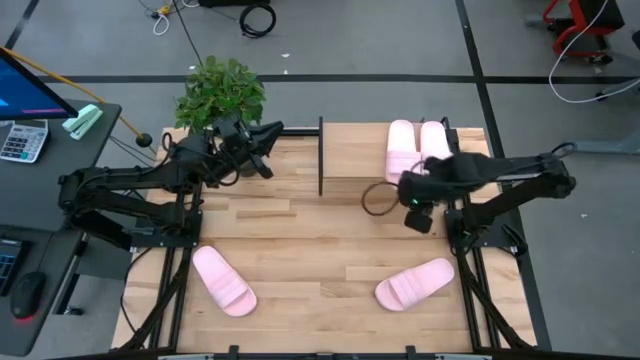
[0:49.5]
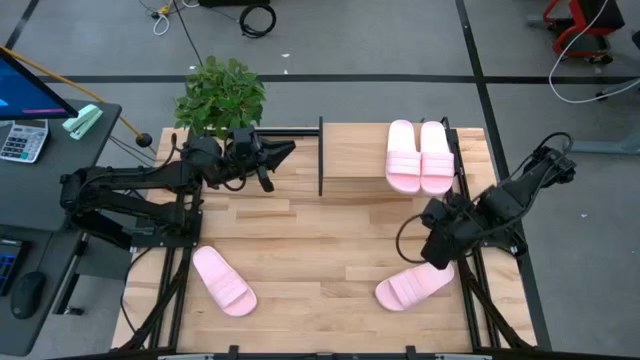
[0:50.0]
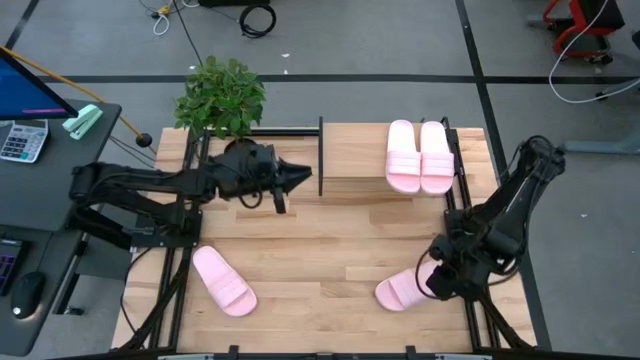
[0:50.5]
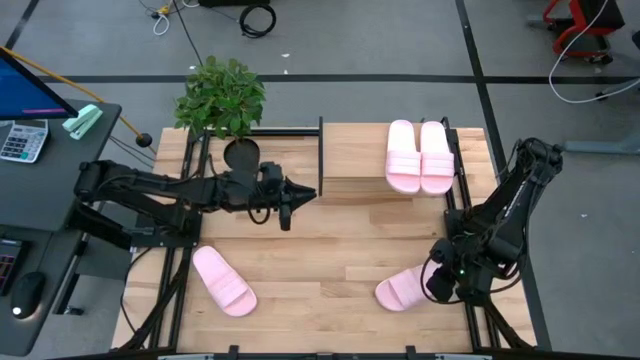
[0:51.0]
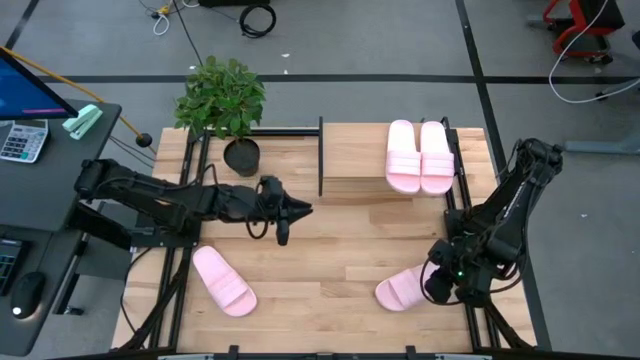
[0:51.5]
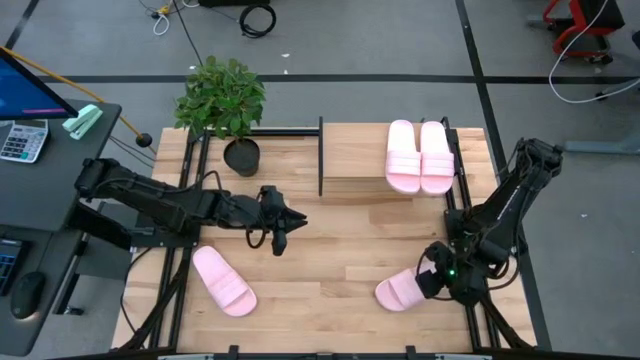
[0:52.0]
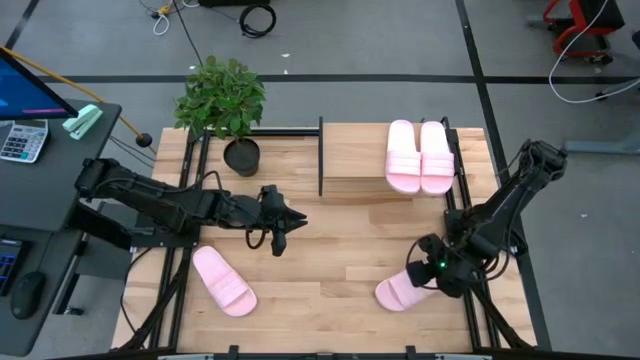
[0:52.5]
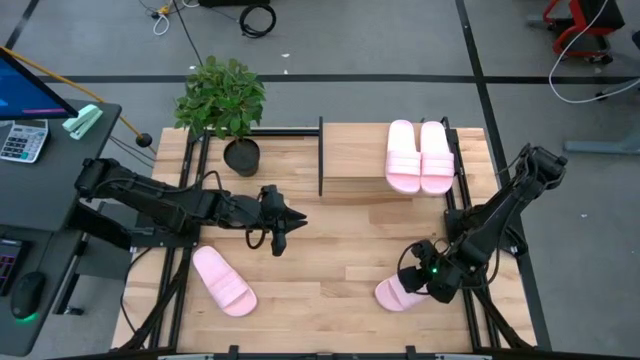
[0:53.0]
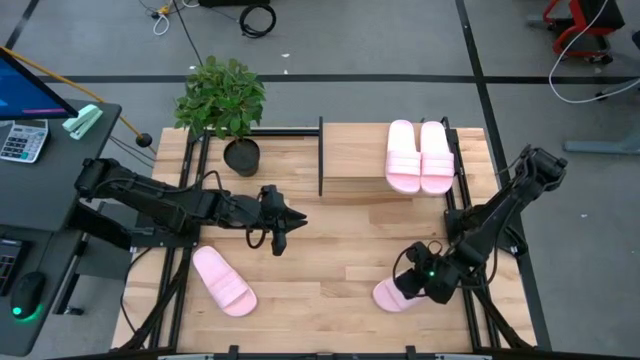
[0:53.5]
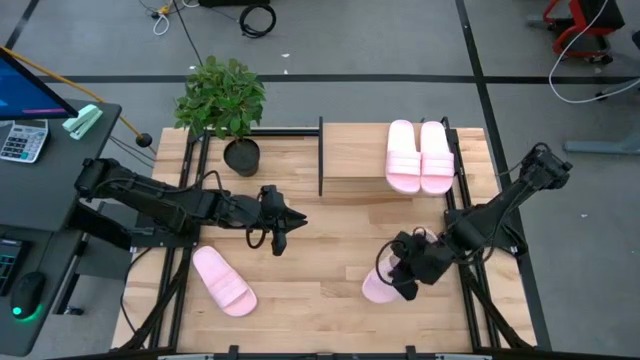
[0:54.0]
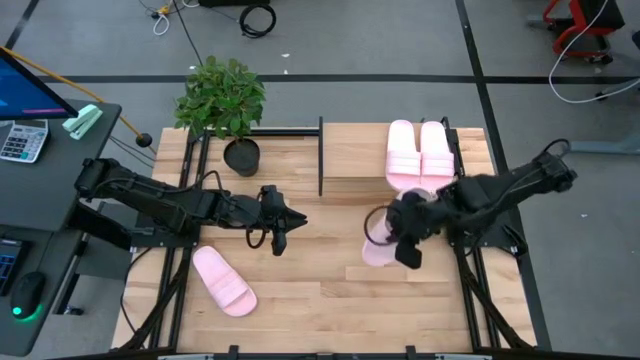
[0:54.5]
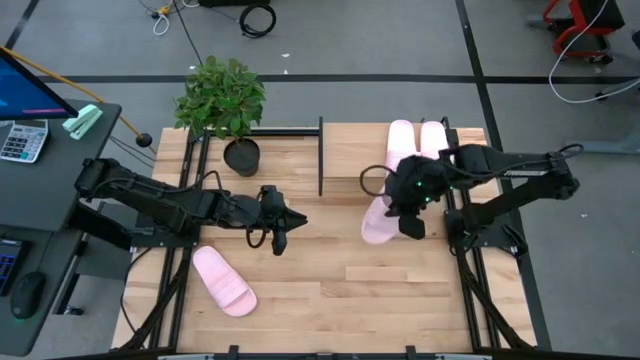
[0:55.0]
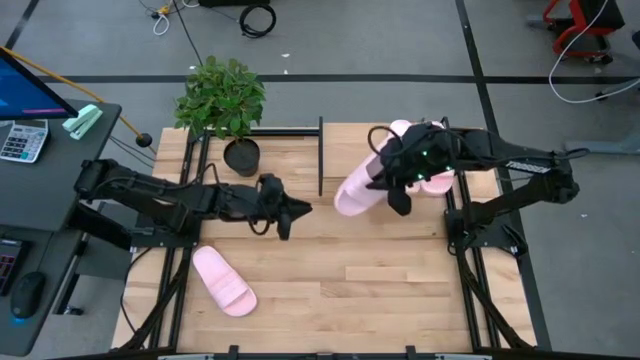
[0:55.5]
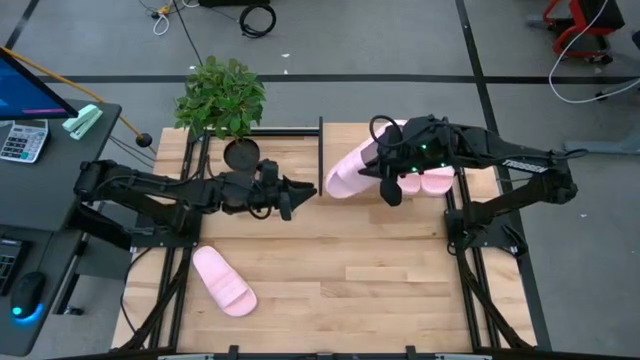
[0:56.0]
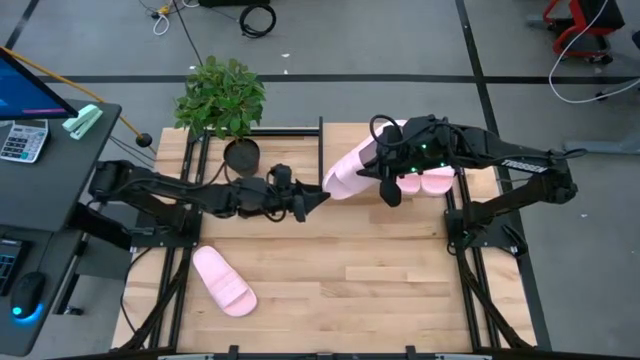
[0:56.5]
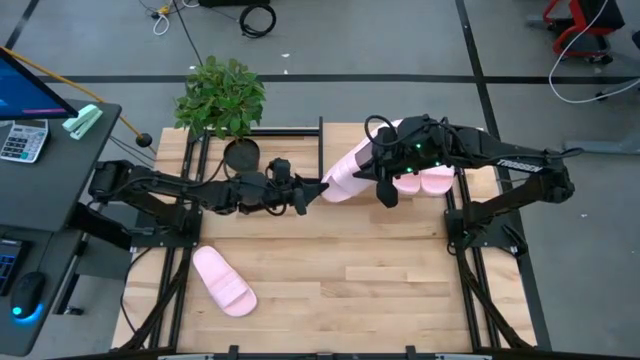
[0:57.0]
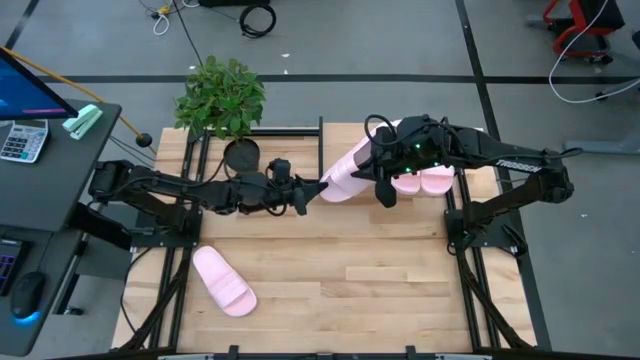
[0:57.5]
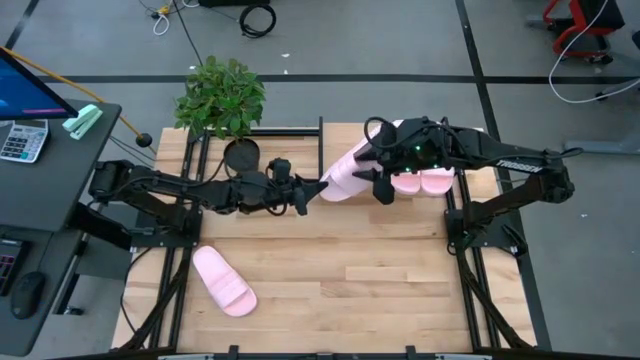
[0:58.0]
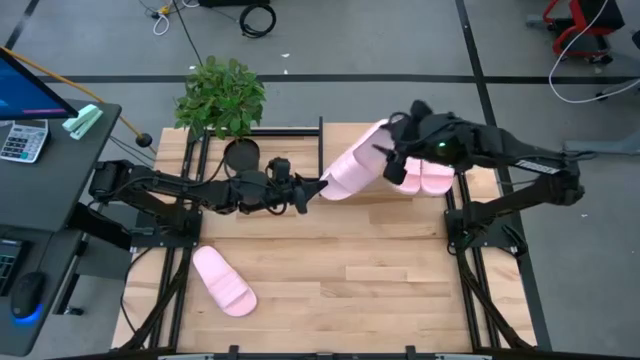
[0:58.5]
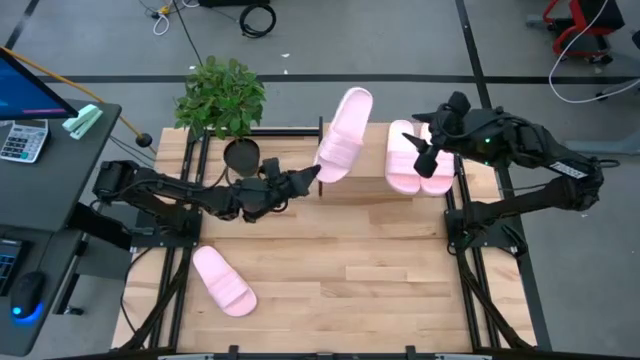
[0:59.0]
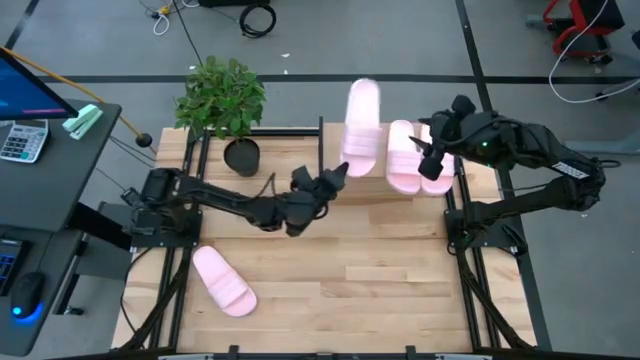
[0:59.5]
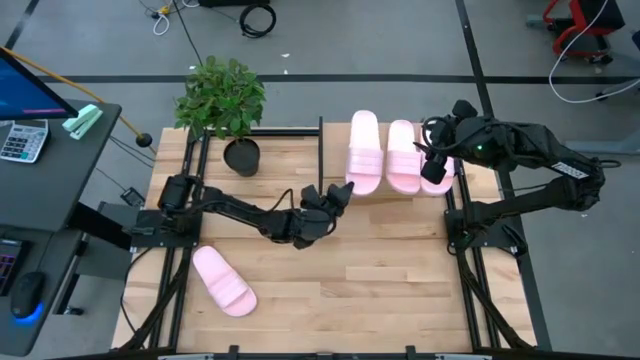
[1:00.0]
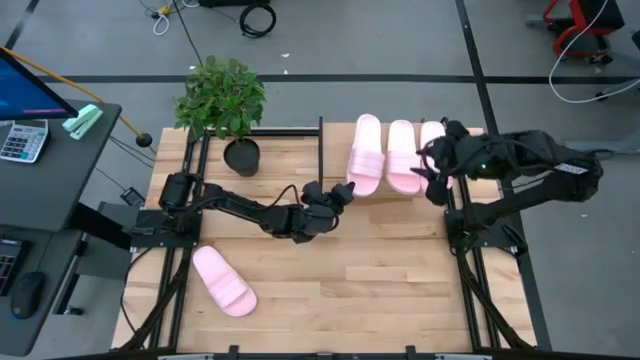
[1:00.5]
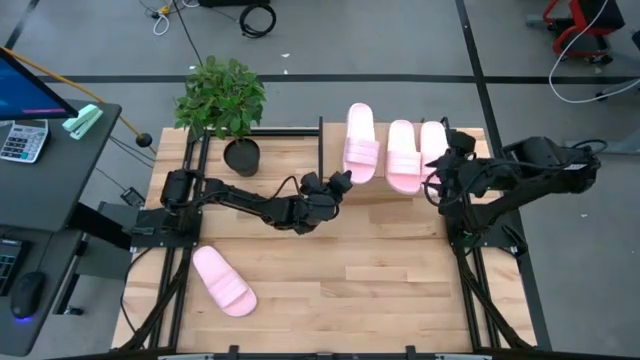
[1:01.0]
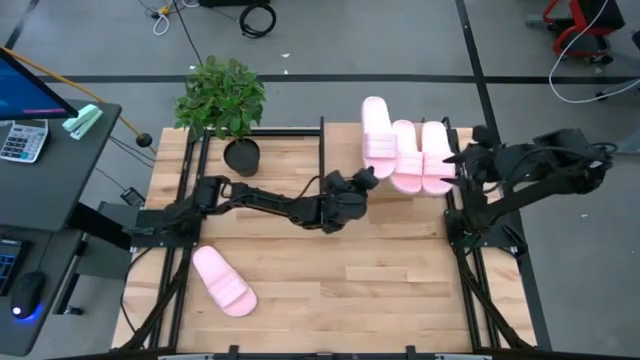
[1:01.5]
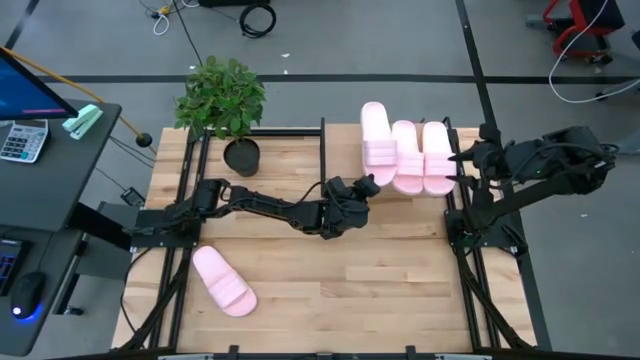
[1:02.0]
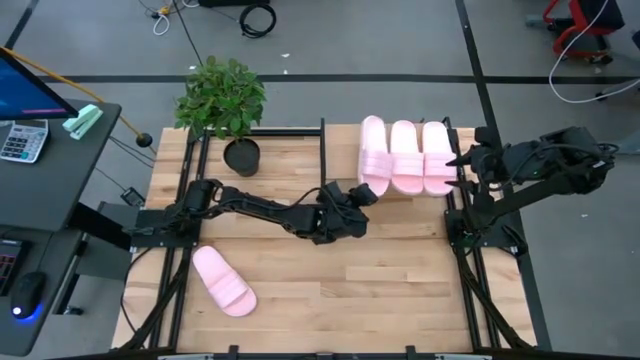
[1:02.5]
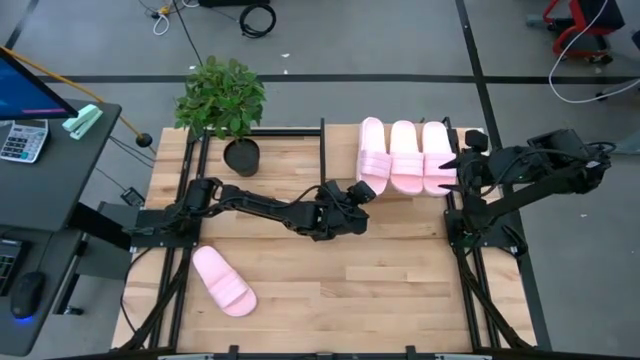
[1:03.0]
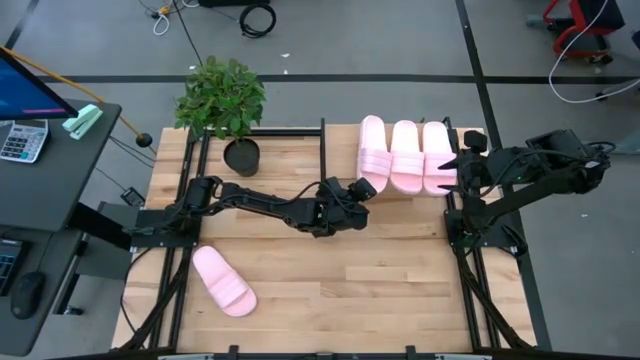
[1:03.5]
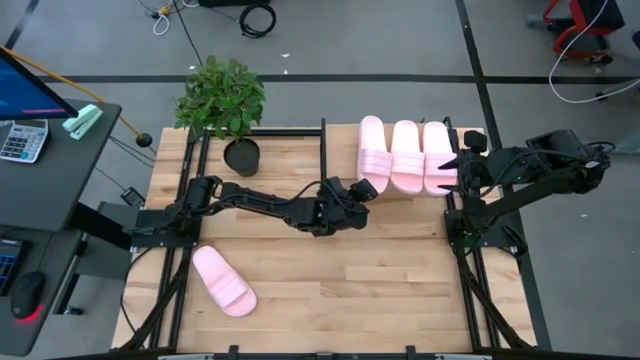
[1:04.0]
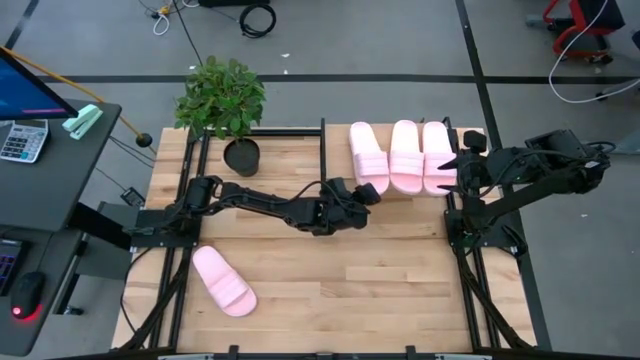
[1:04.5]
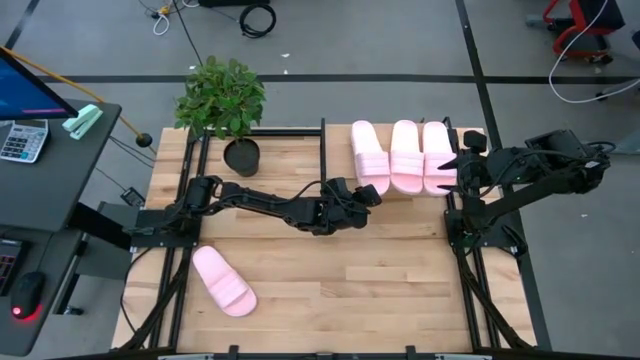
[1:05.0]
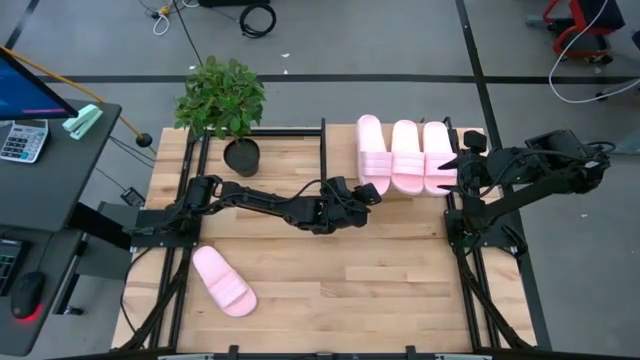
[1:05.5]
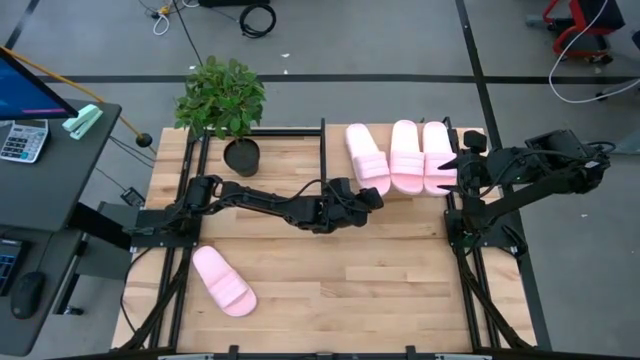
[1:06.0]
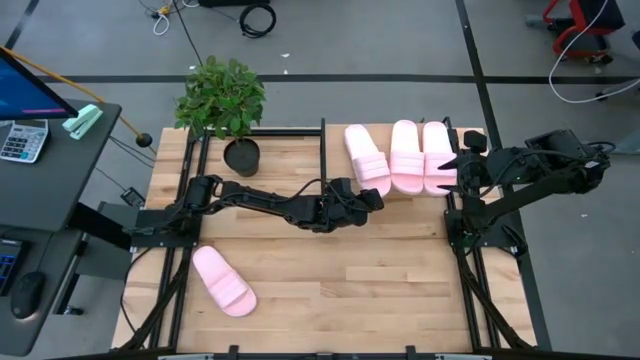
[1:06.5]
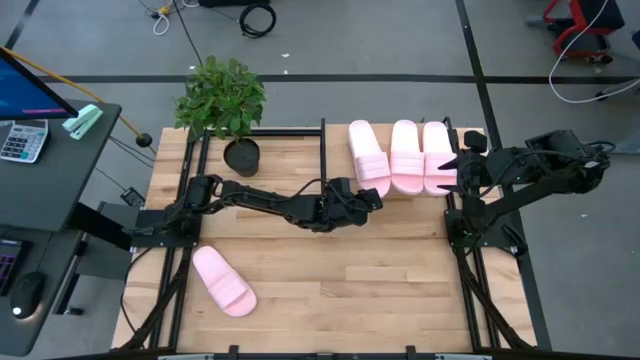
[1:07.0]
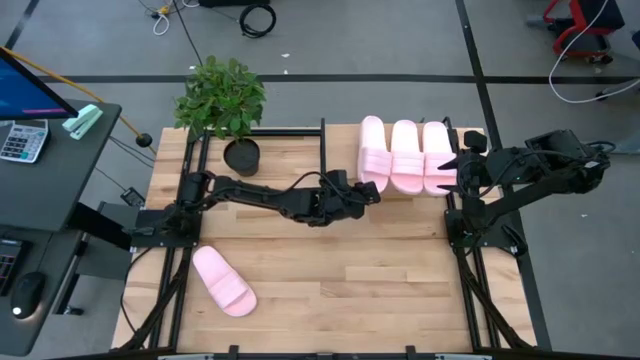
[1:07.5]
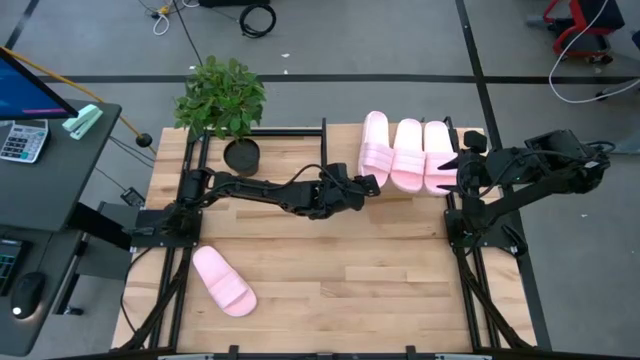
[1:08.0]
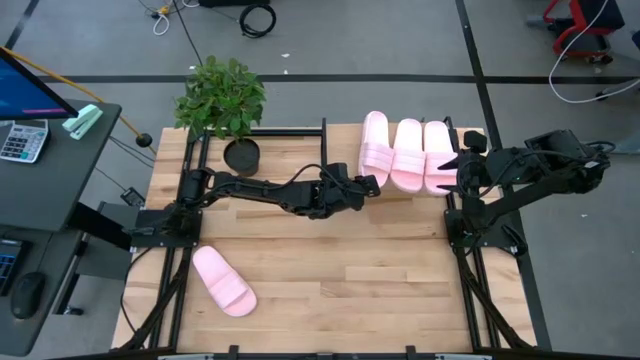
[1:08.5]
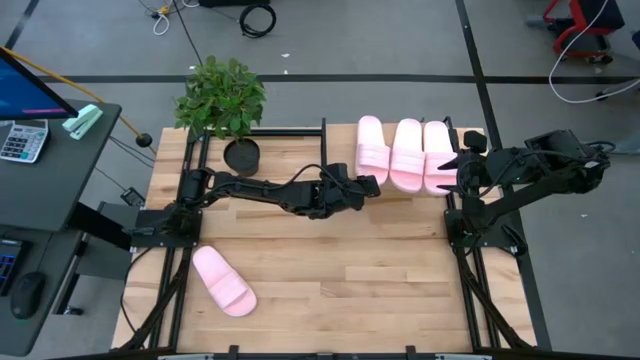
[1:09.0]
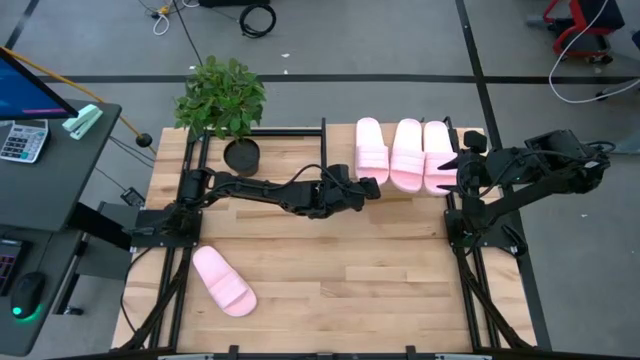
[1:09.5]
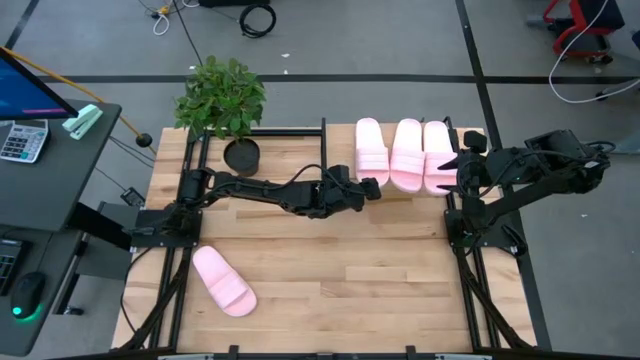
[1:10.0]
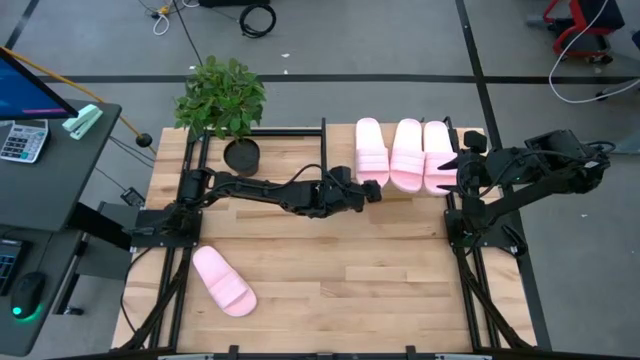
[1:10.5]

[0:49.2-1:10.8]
Task: Pick and place slides into the shelf
Put the right pink slide on the shelf

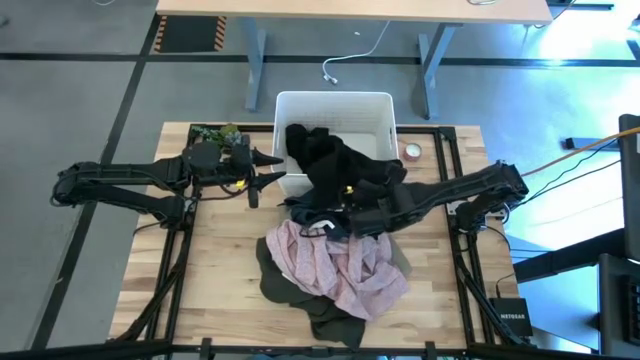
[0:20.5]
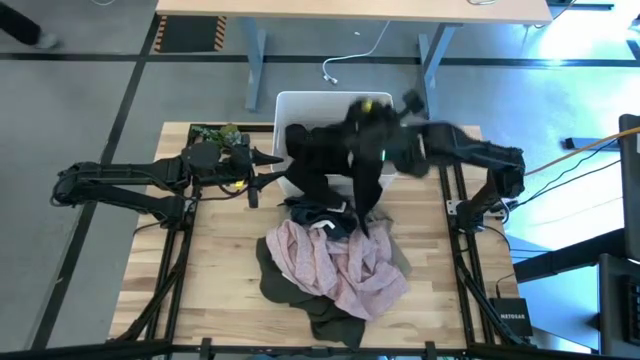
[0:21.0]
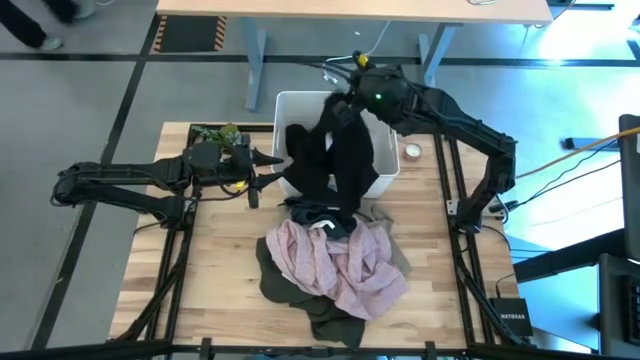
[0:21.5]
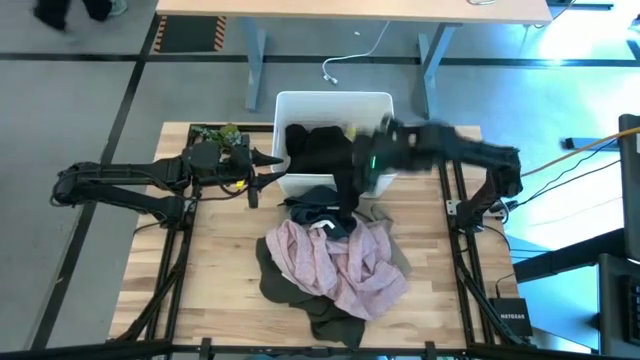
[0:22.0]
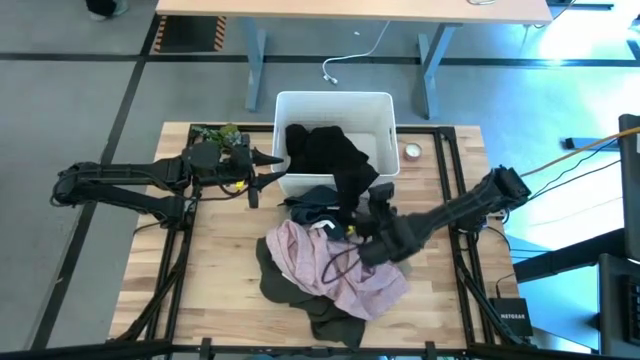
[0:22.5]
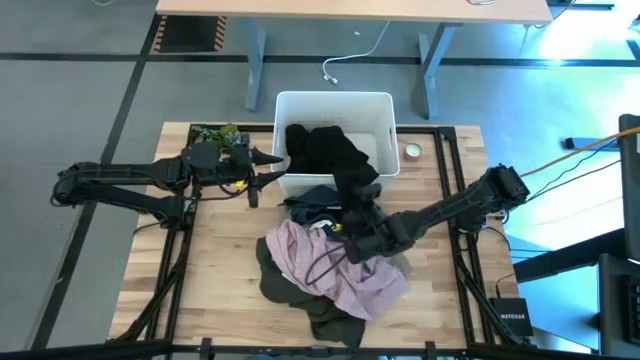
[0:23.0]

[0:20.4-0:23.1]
Task: Sort clothes
Put the black shirt into the white laundry bin
